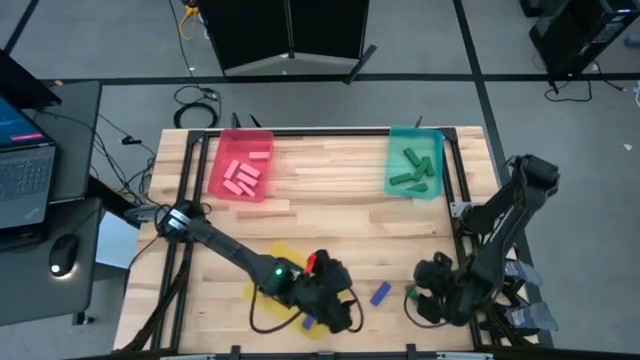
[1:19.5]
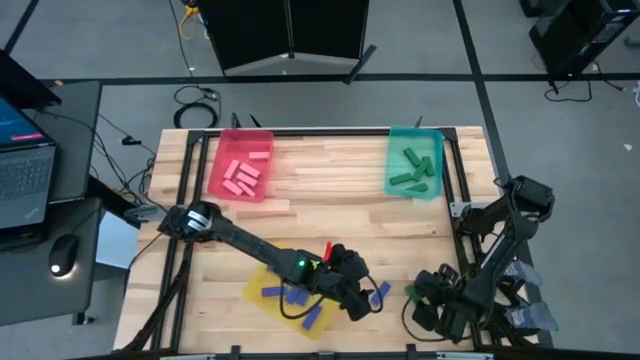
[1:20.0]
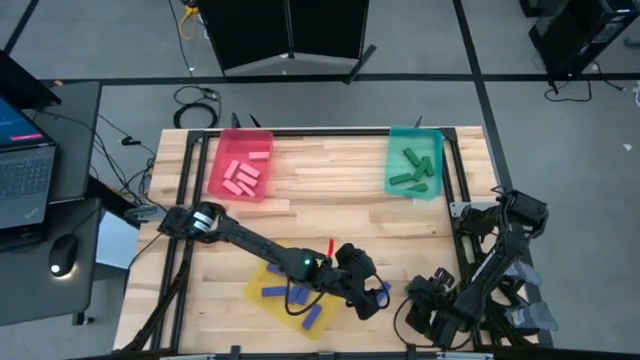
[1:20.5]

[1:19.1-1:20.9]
Task: Sort blocks
Put the green block into the blue bin

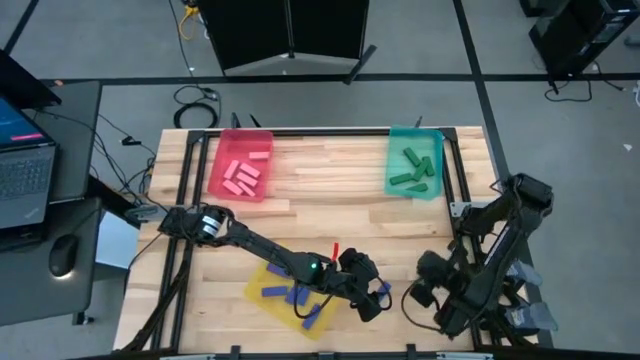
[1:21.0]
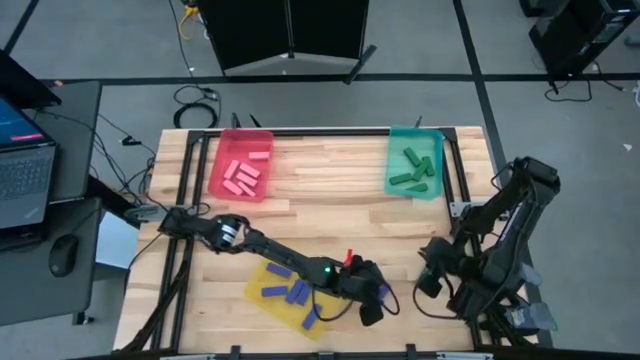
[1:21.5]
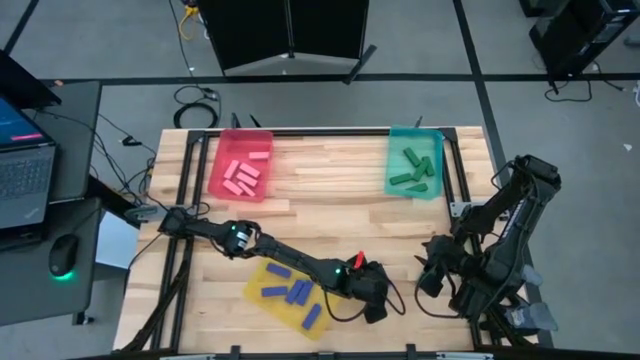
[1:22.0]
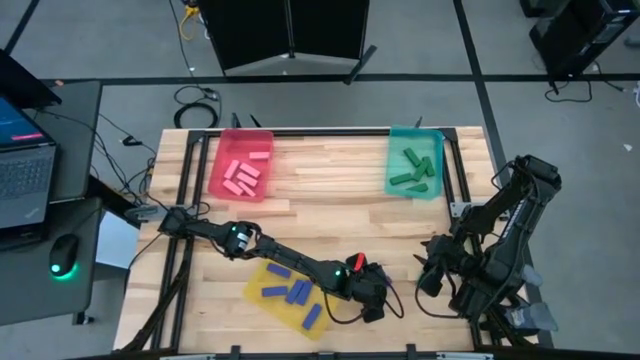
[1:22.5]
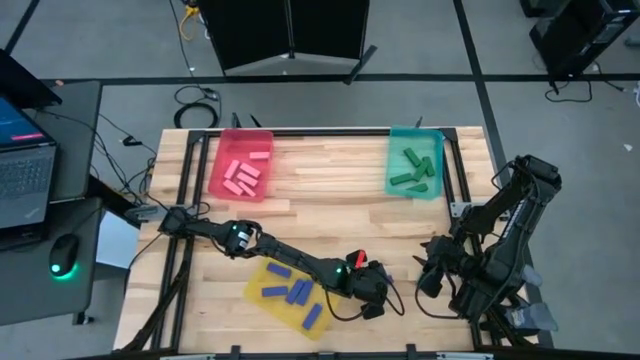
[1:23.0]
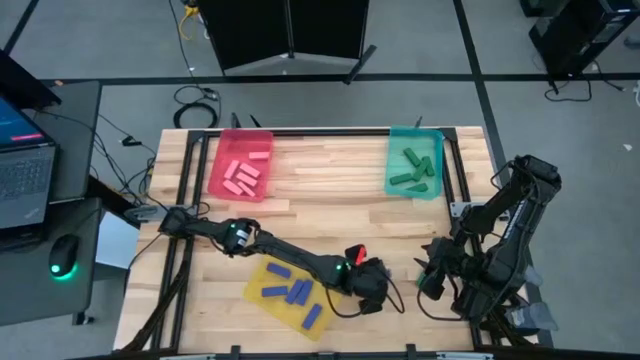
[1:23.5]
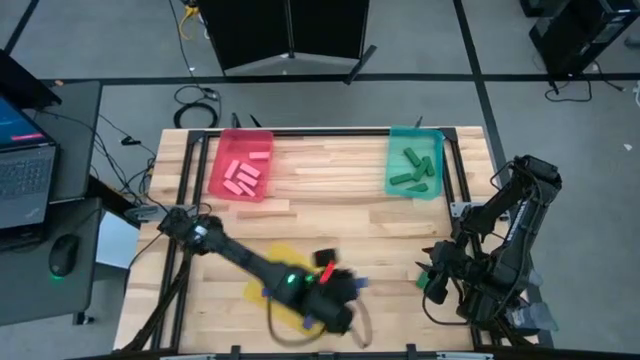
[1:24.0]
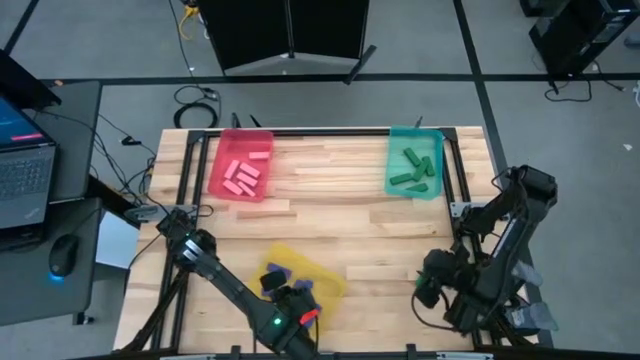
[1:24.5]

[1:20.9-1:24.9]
Put the blue block into the yellow bin

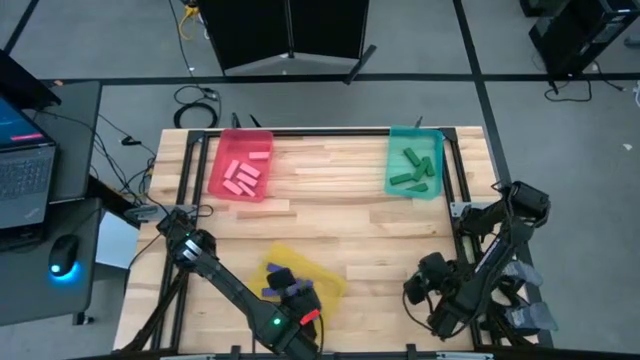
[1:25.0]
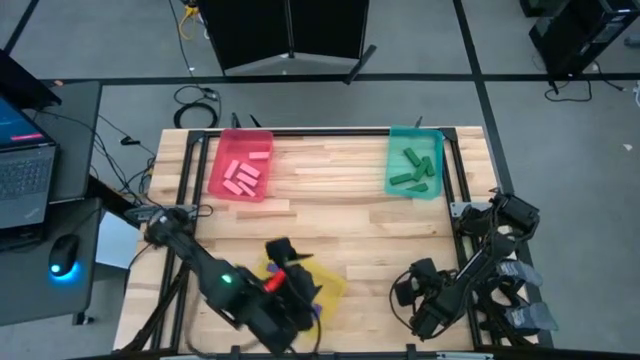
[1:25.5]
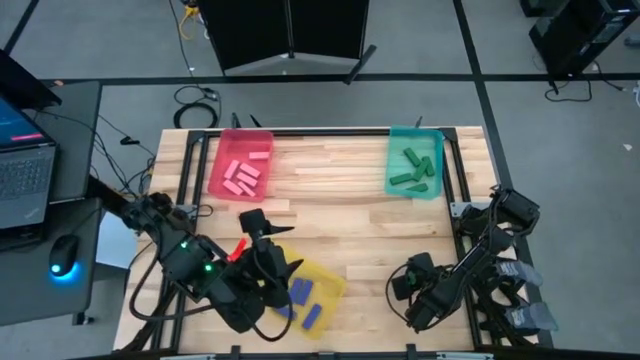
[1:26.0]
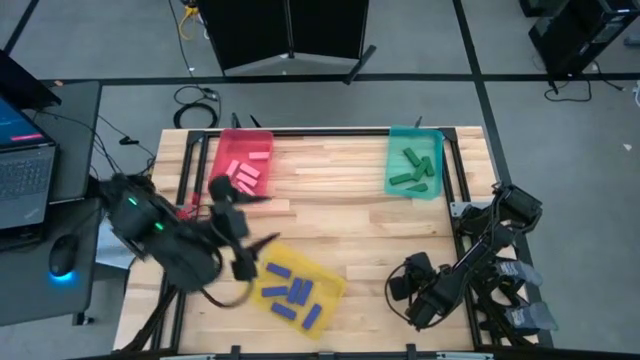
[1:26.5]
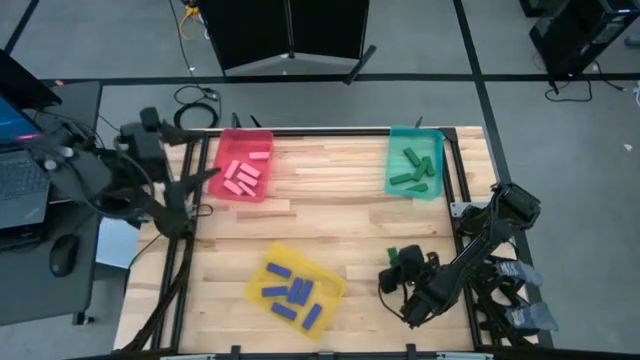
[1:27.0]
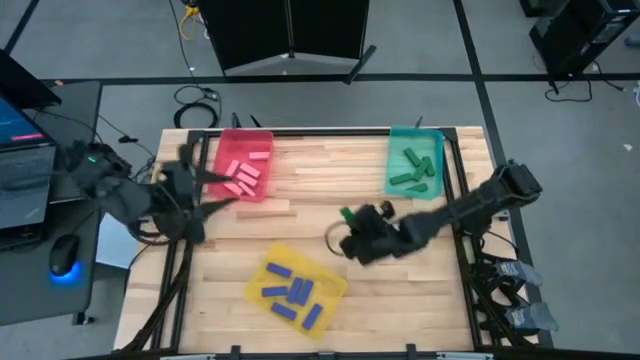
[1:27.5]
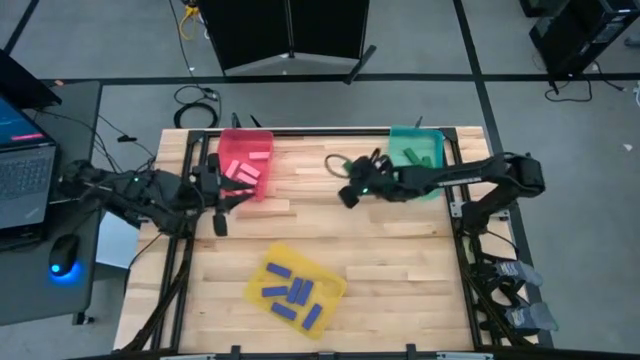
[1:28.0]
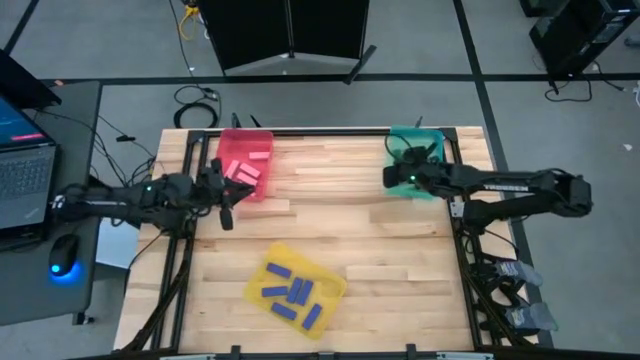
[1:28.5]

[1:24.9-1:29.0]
Put the green block into the blue bin

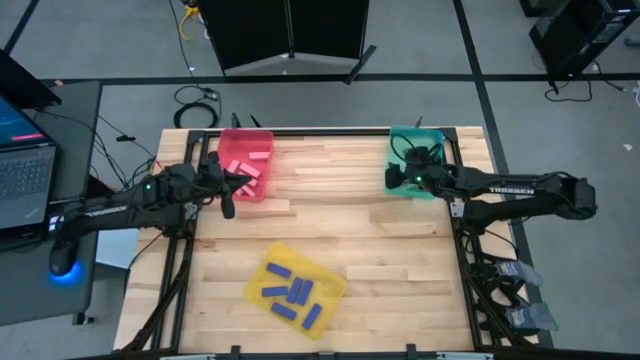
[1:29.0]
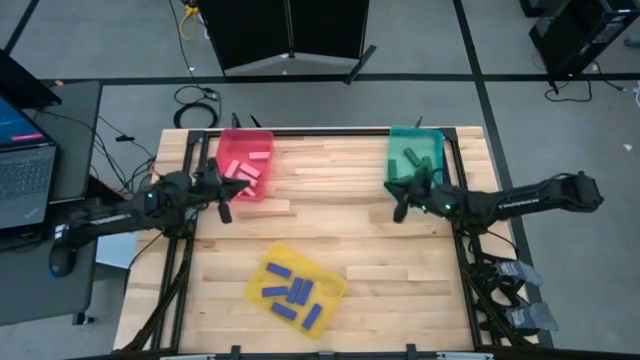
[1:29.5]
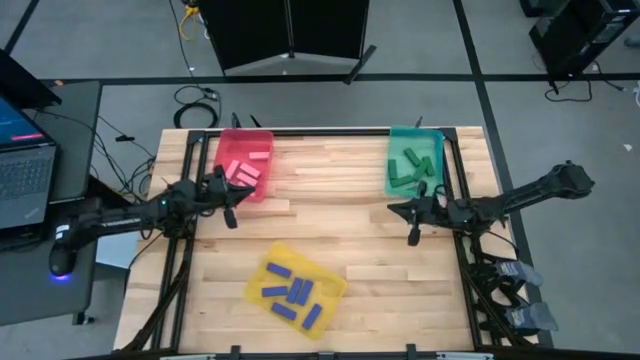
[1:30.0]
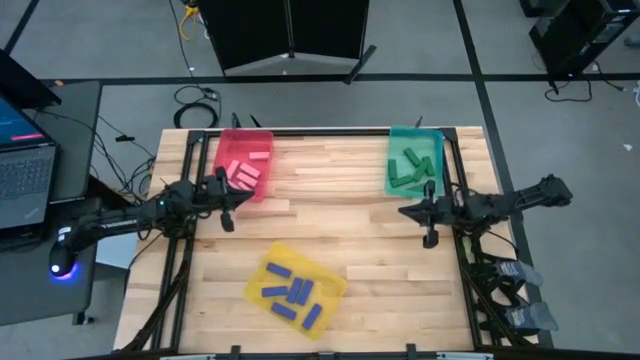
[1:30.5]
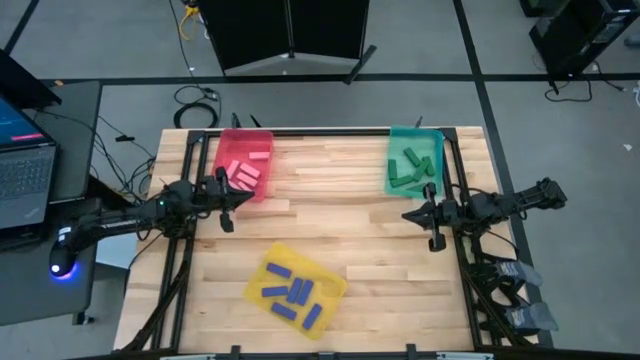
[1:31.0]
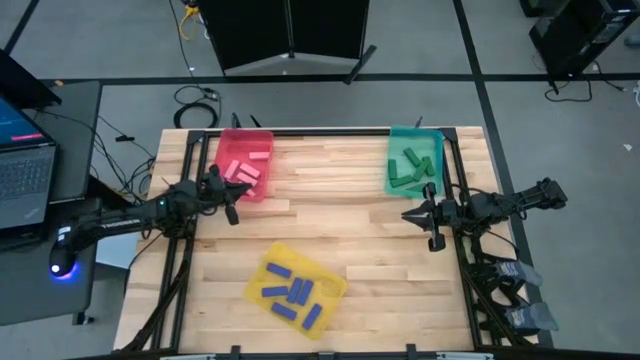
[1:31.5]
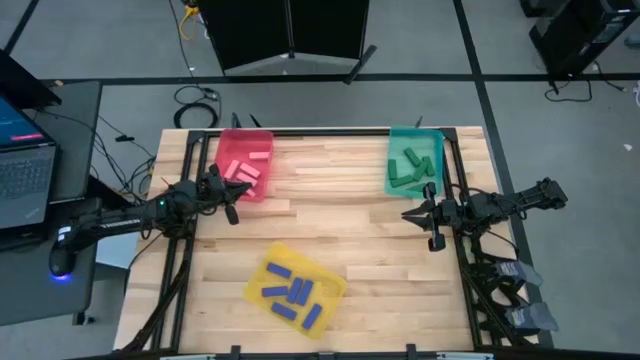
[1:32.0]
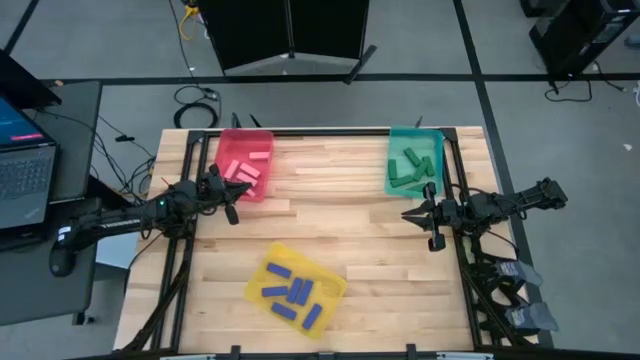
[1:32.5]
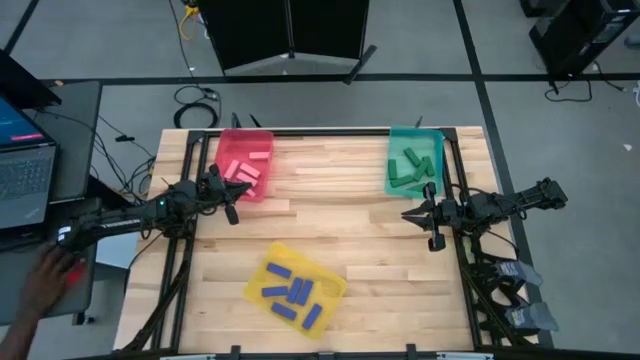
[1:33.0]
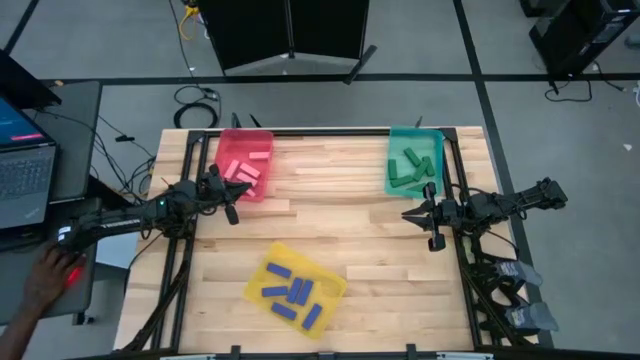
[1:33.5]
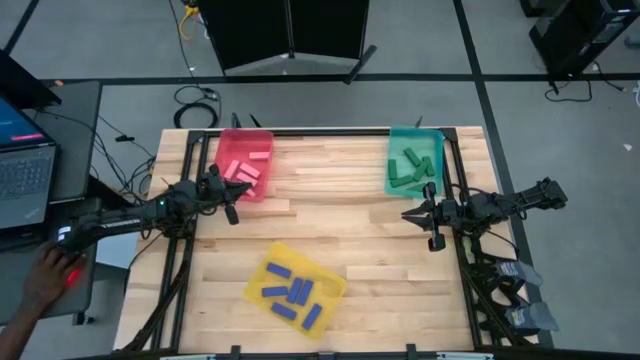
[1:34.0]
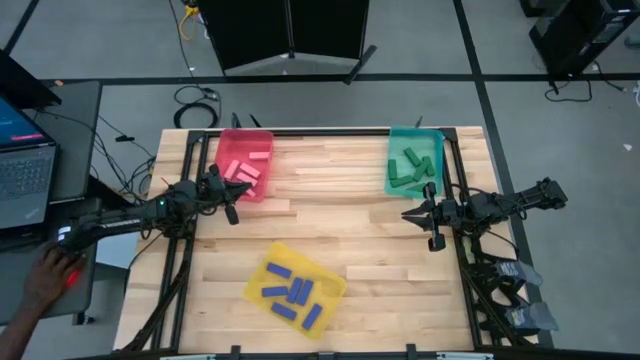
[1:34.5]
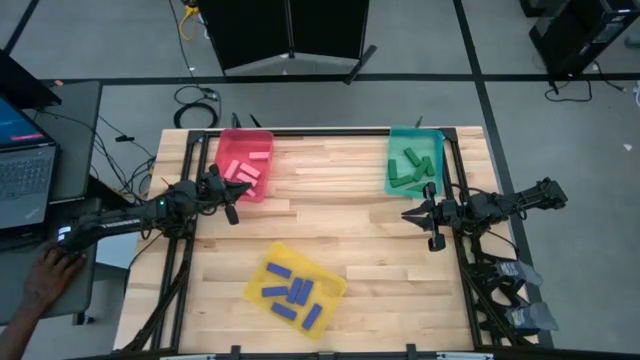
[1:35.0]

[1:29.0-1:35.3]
Return to Home Position

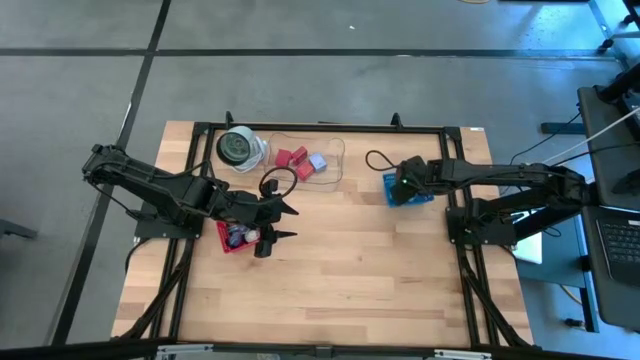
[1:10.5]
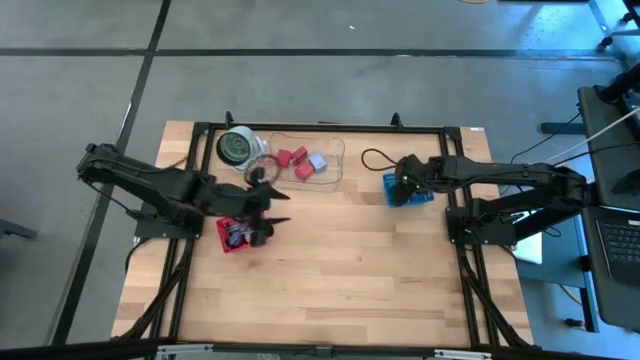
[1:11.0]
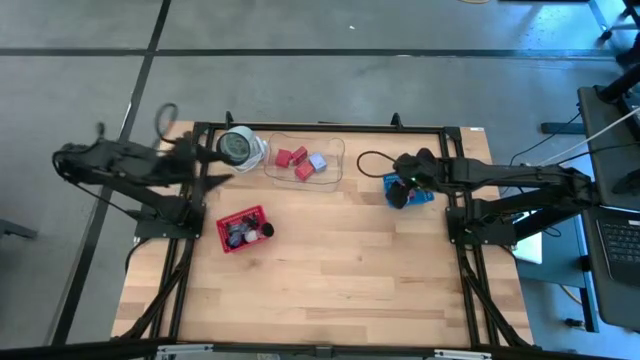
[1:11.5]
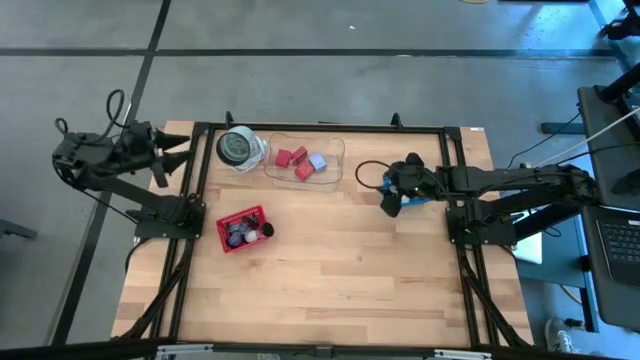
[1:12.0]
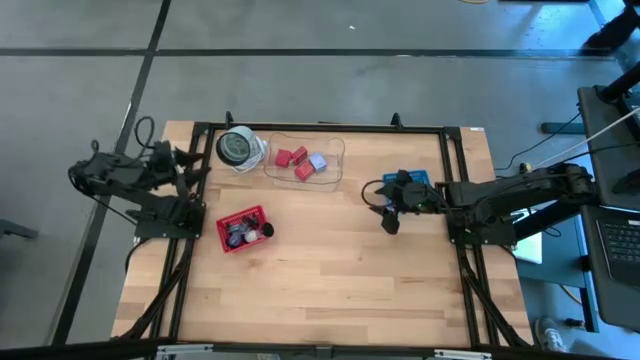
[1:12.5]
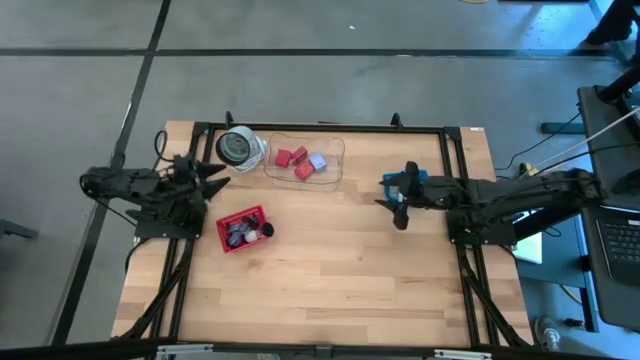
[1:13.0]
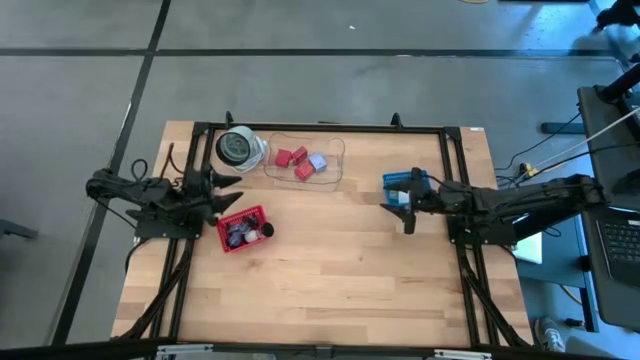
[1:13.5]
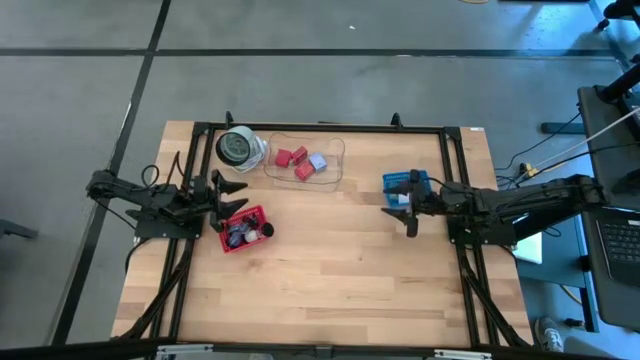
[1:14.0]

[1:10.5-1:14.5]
Task: Pick & Place Office items
Return to Home Position
